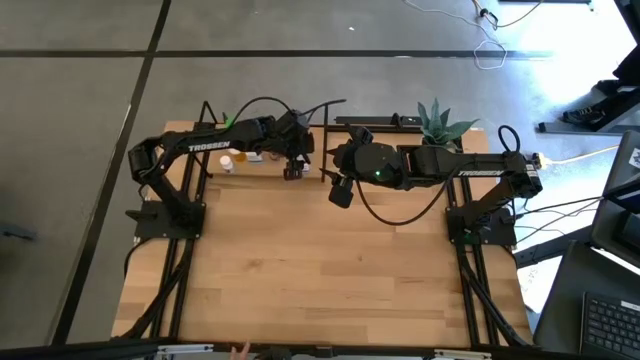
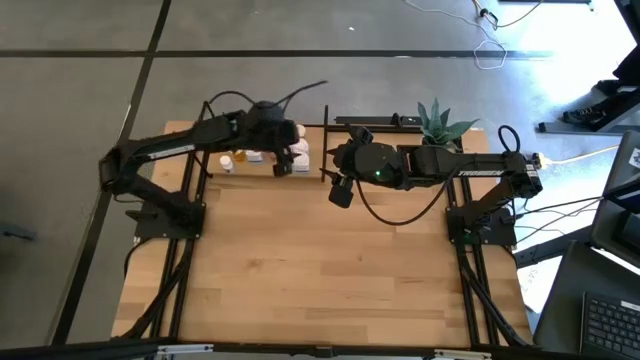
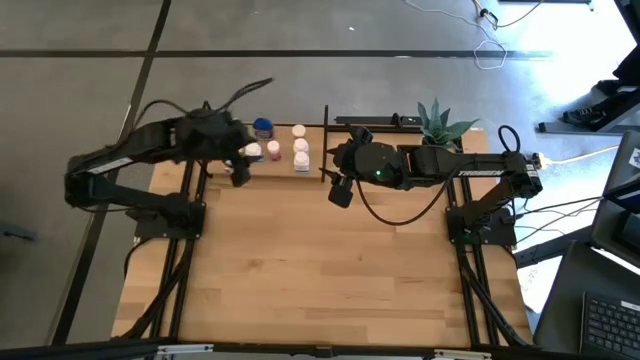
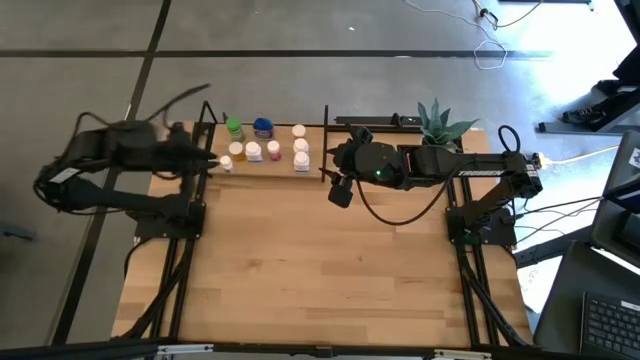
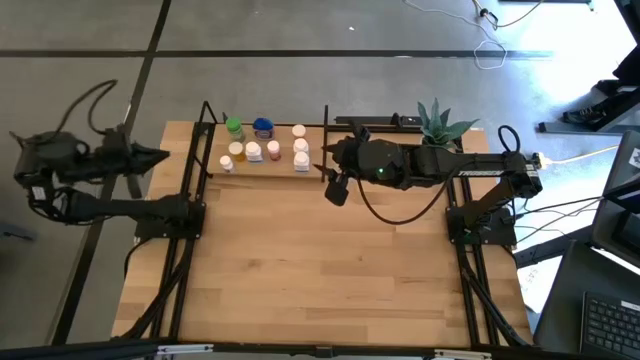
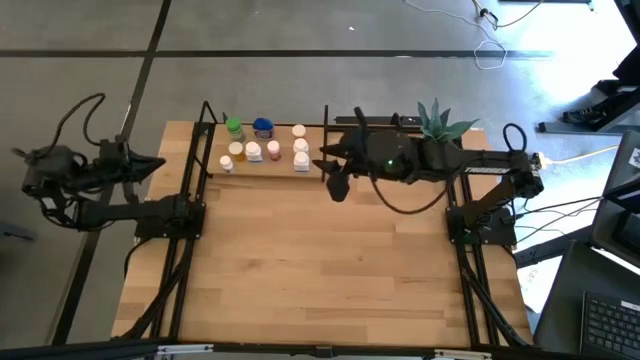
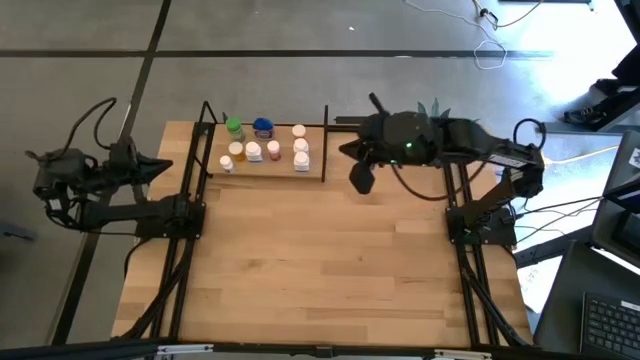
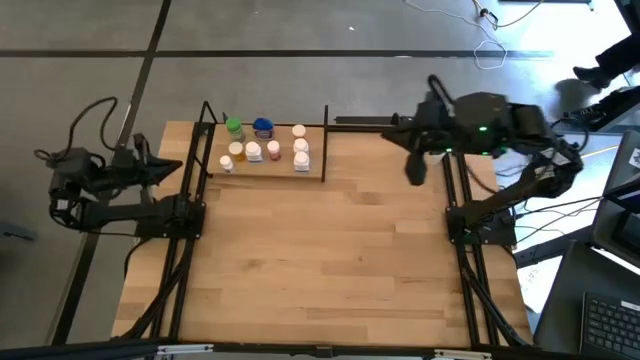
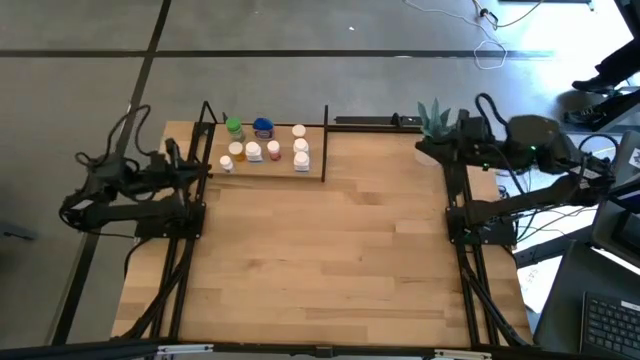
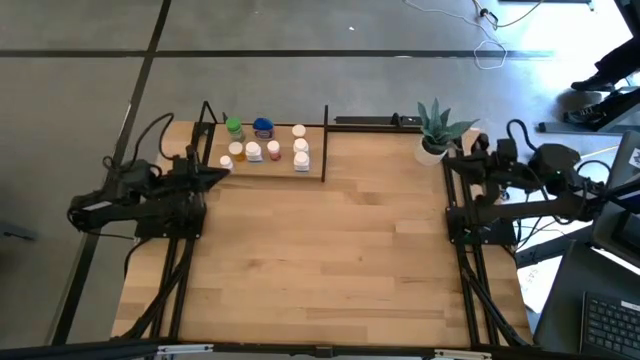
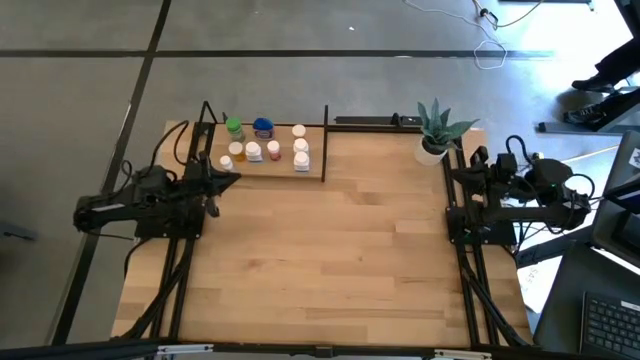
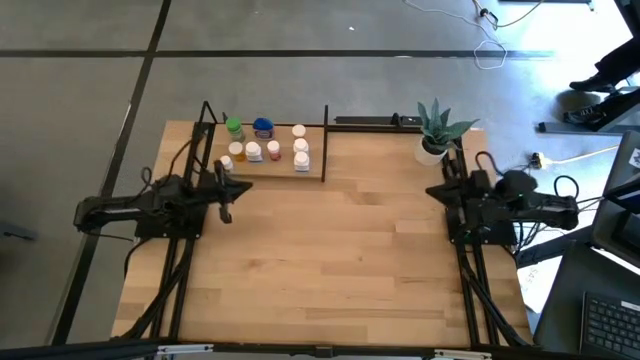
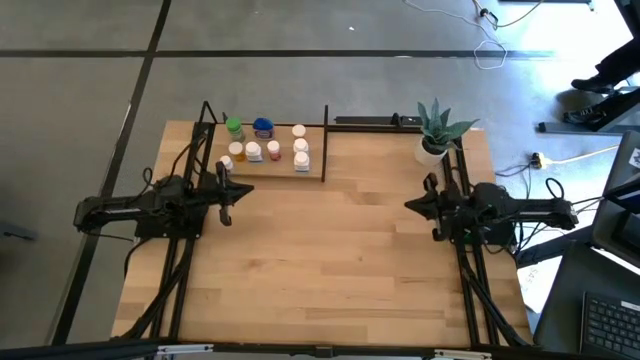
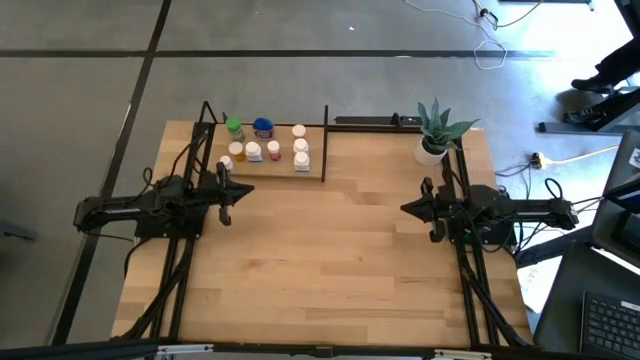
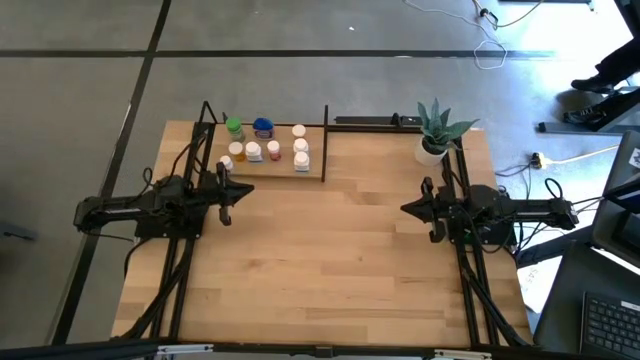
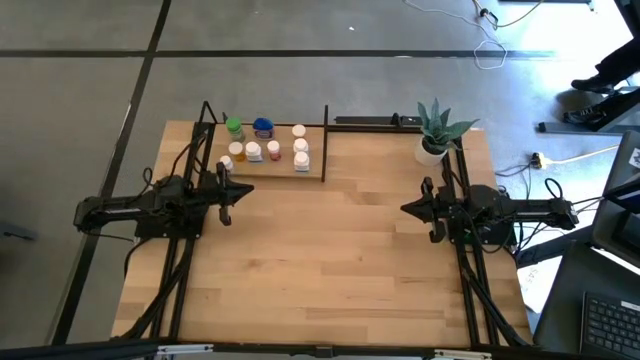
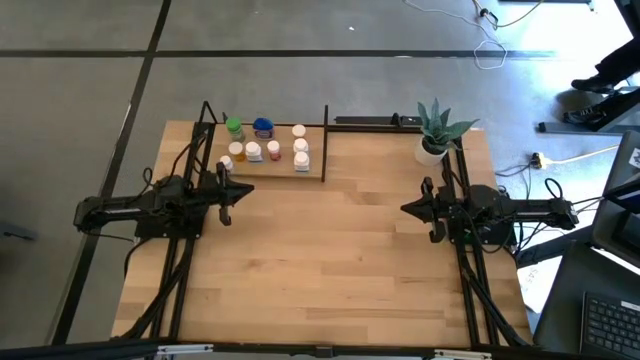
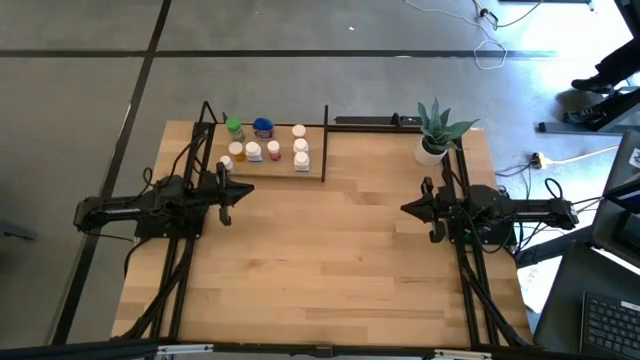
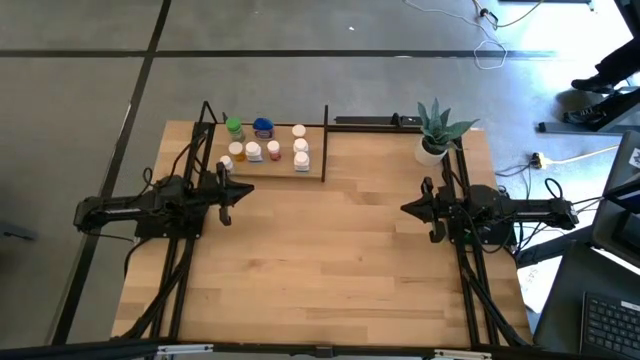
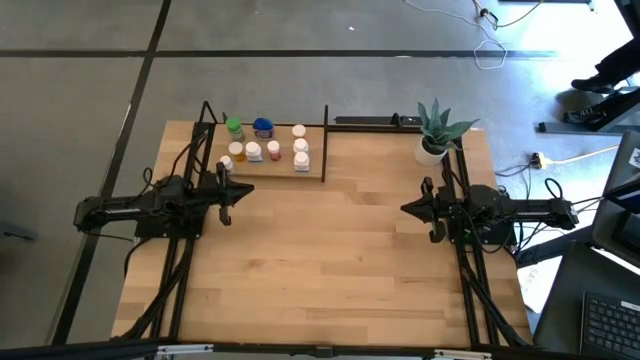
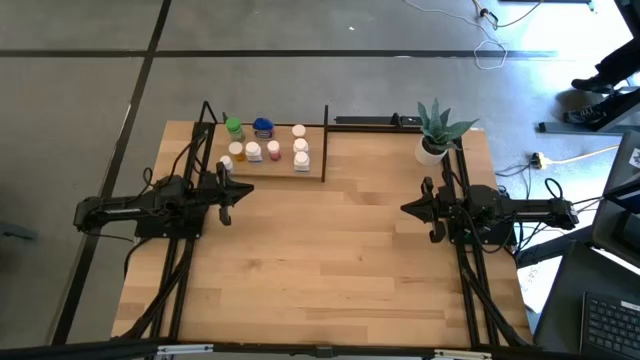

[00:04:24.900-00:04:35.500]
Task: Pick and place medicine bottles onto shelf by color
Return to Home Position
